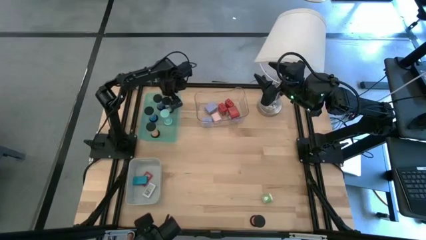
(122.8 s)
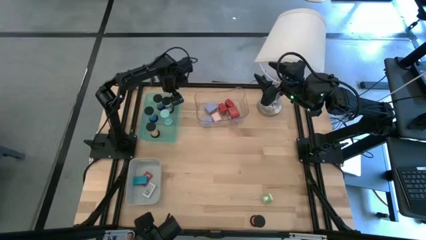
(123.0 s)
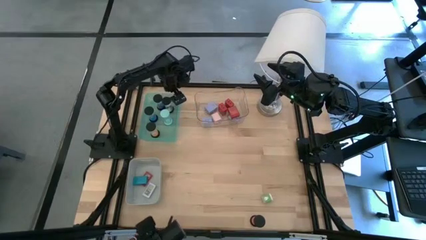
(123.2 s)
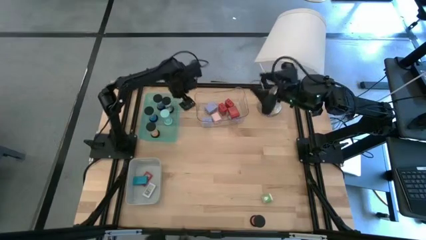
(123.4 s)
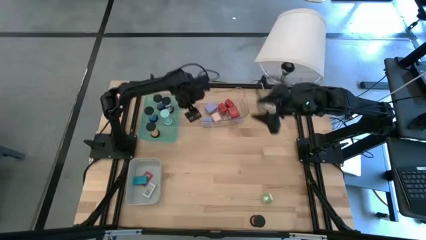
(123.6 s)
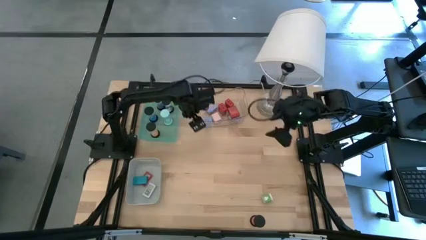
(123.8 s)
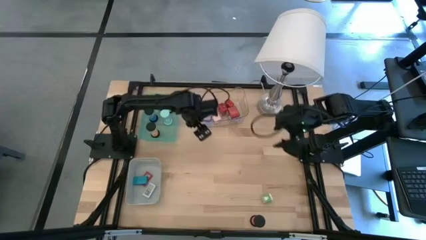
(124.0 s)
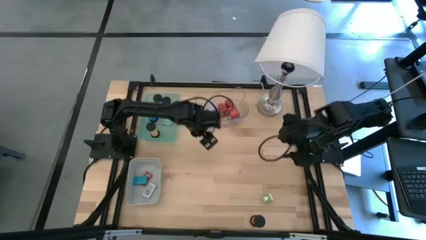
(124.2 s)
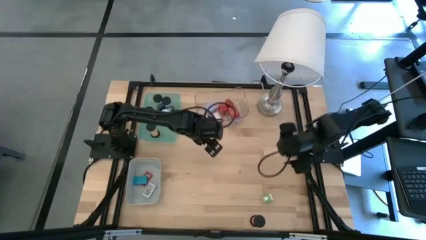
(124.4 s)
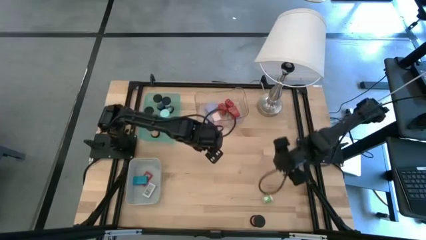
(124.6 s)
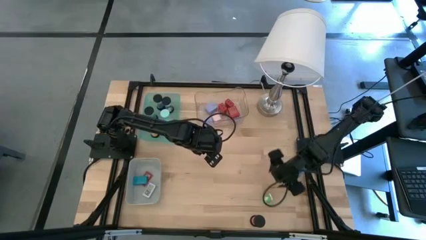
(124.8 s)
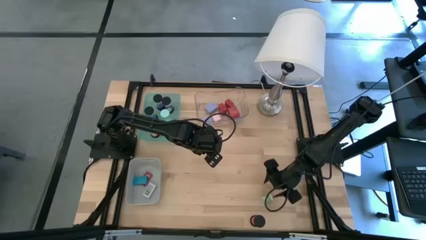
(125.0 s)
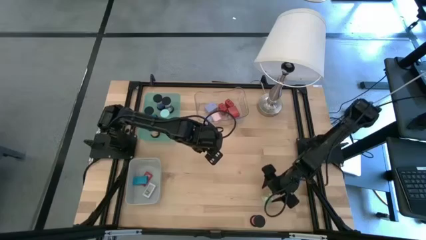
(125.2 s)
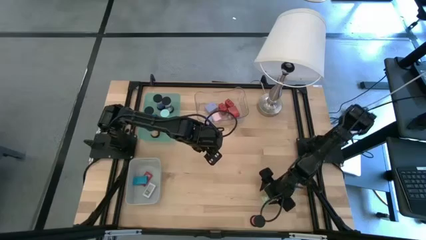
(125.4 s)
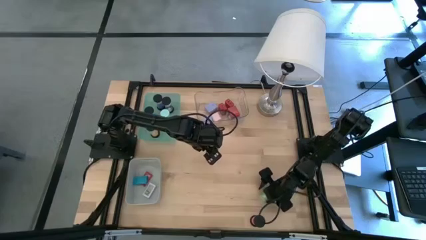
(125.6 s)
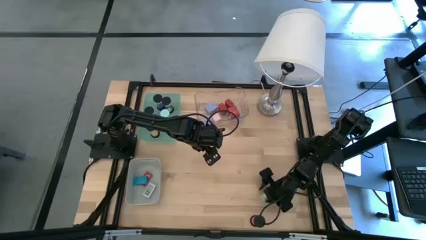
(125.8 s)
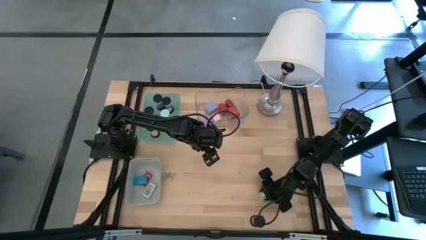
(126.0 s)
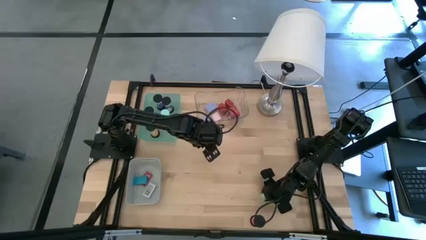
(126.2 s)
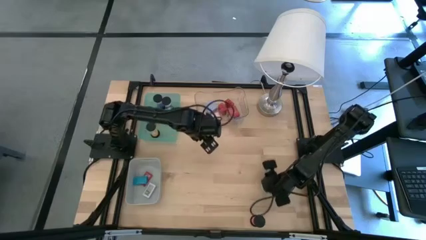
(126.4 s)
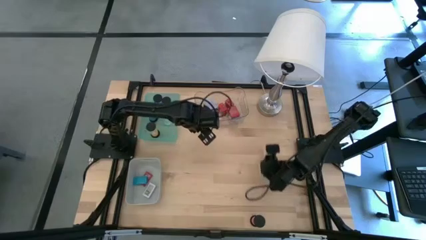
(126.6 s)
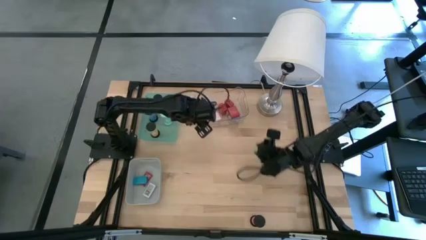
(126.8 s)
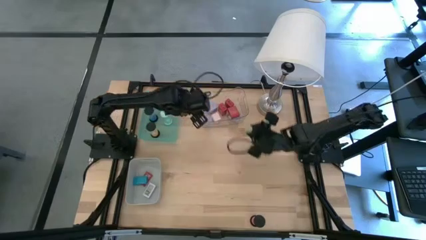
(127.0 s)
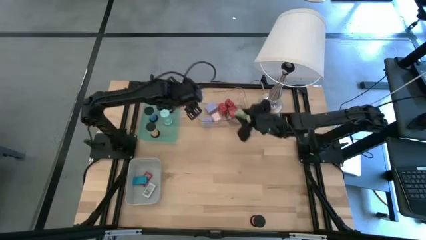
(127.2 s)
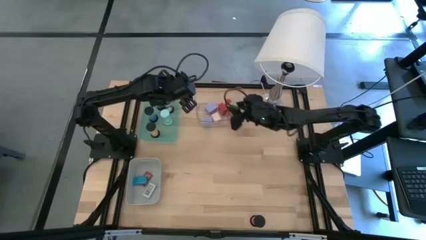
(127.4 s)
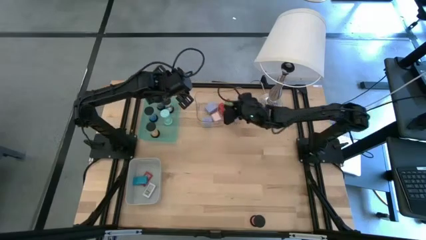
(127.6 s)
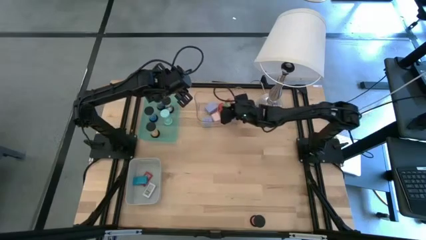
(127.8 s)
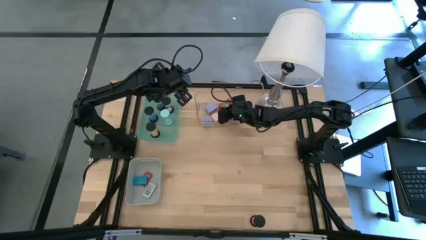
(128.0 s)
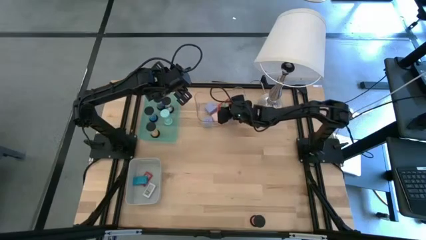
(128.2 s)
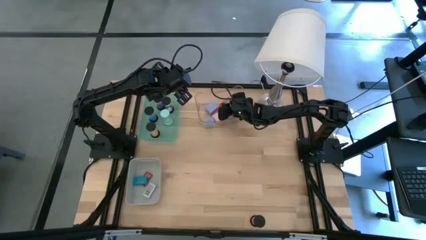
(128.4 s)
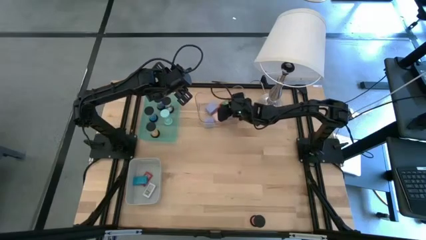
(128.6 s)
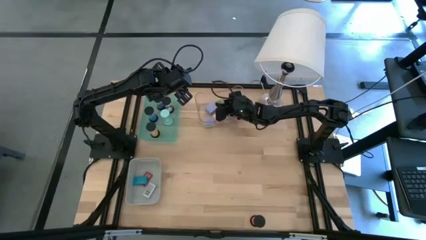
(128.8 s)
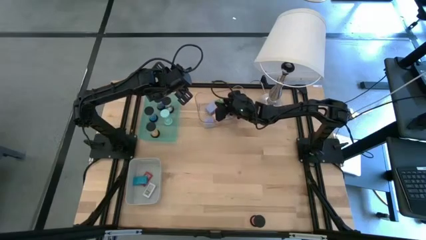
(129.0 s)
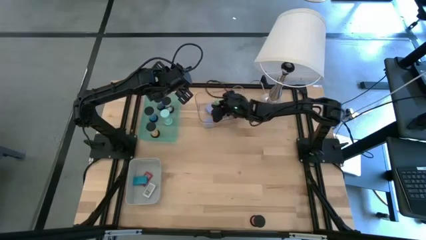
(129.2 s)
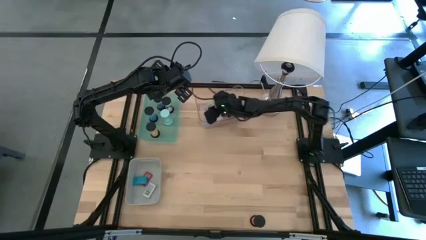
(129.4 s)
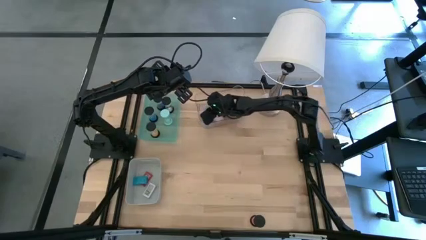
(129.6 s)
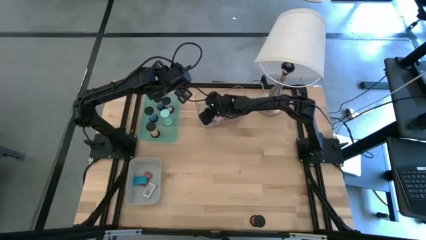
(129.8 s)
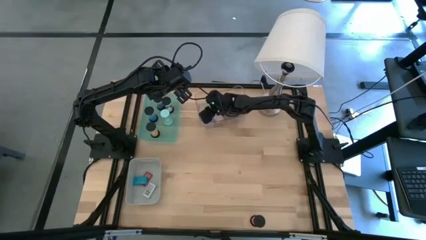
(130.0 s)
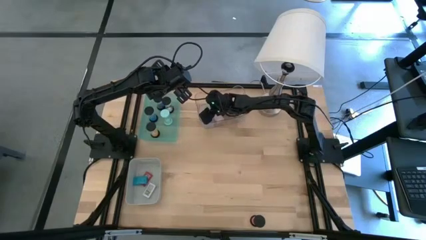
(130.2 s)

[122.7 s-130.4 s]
Task: Pick & Place Office items
Put the green charger adapter into the transparent bin

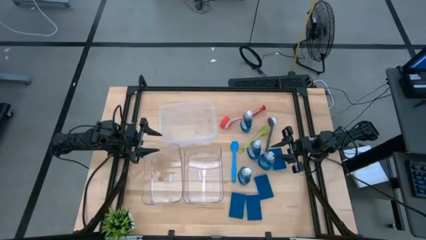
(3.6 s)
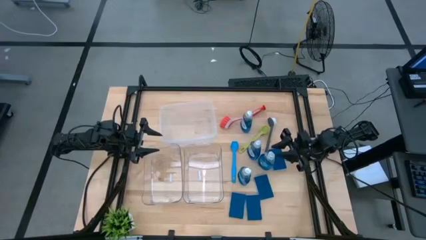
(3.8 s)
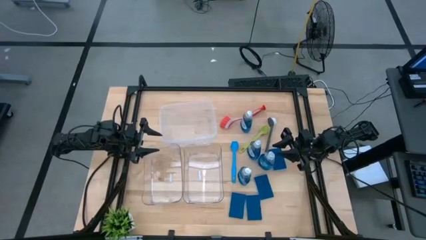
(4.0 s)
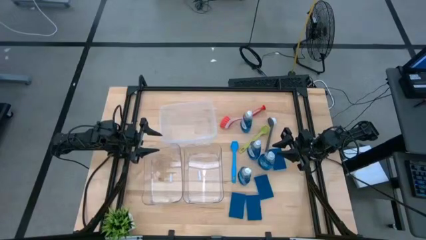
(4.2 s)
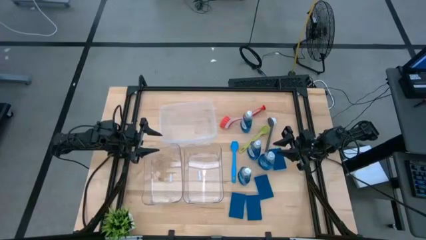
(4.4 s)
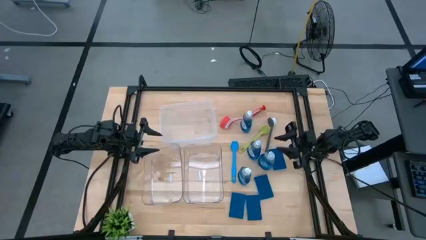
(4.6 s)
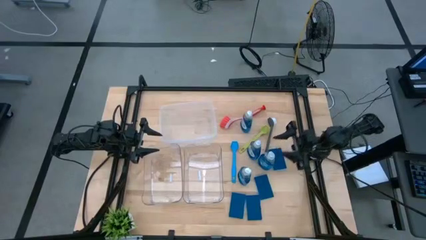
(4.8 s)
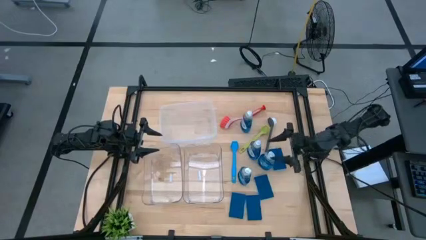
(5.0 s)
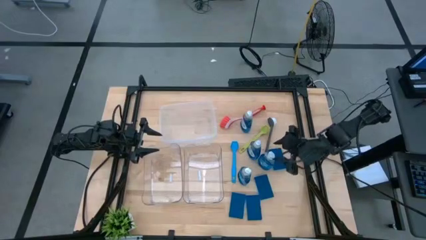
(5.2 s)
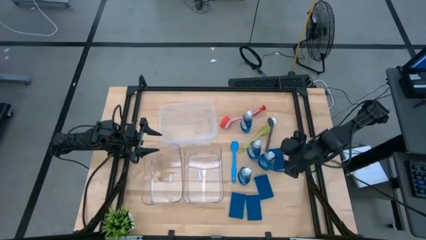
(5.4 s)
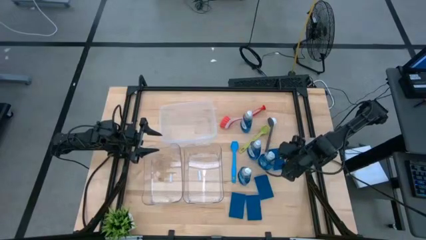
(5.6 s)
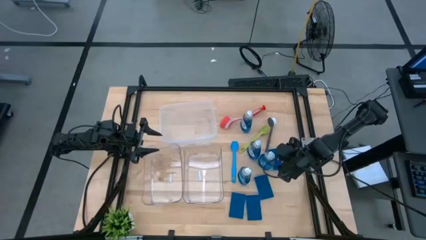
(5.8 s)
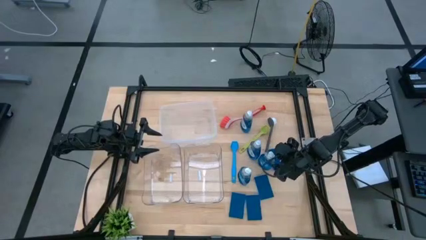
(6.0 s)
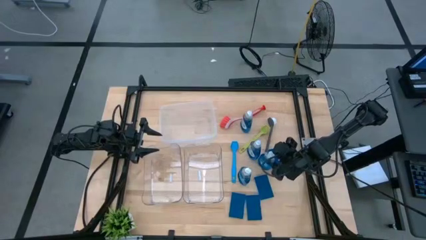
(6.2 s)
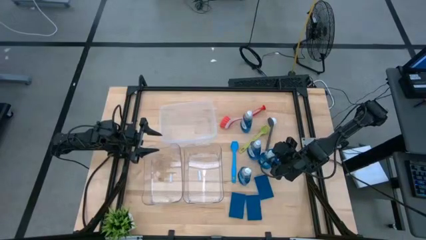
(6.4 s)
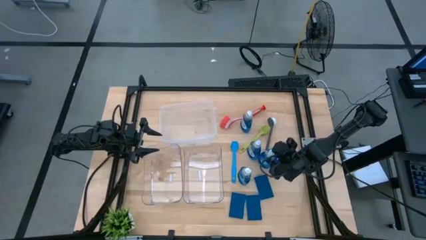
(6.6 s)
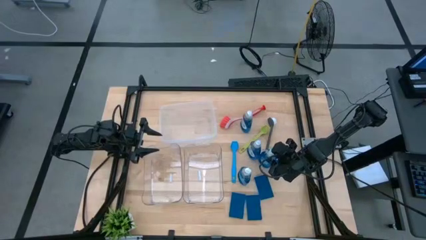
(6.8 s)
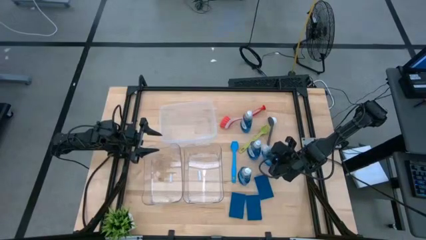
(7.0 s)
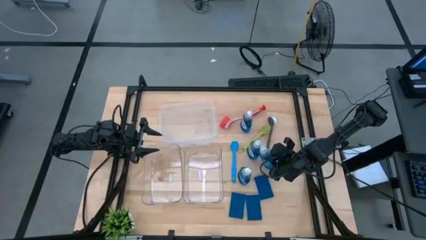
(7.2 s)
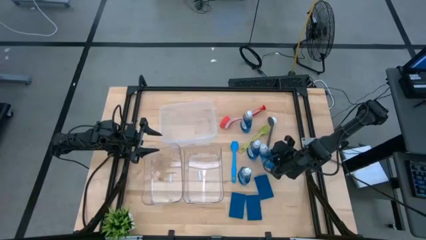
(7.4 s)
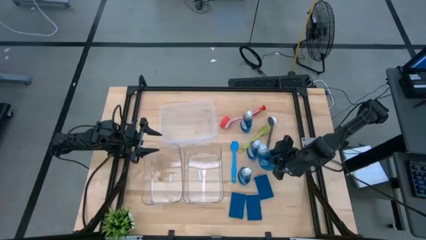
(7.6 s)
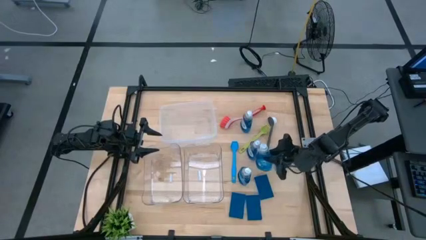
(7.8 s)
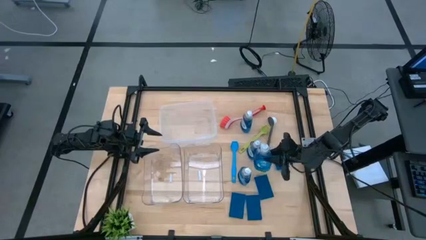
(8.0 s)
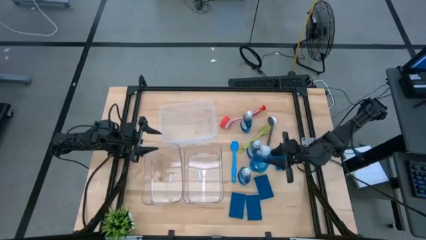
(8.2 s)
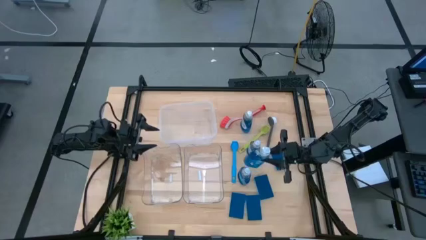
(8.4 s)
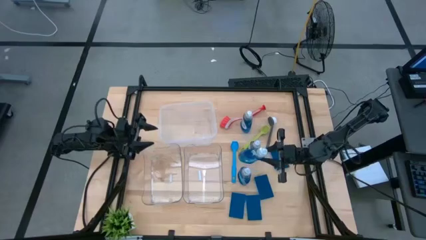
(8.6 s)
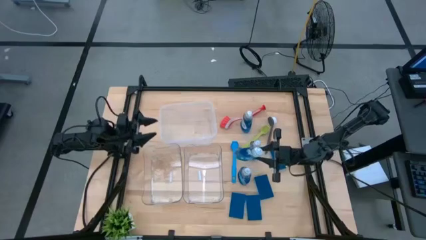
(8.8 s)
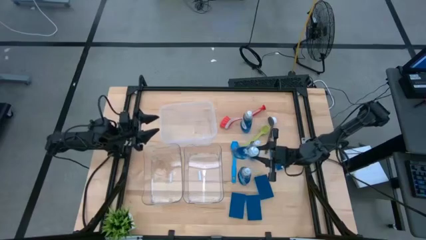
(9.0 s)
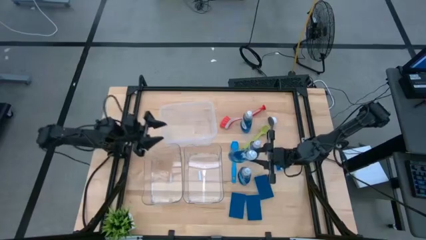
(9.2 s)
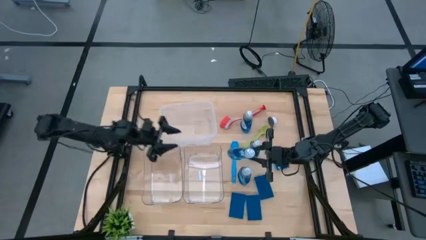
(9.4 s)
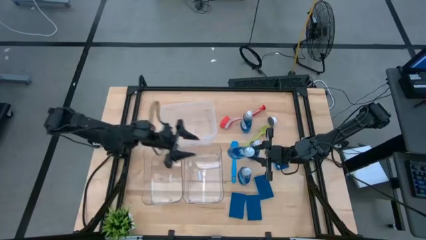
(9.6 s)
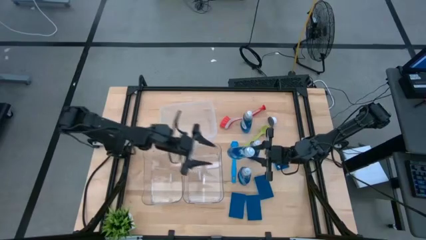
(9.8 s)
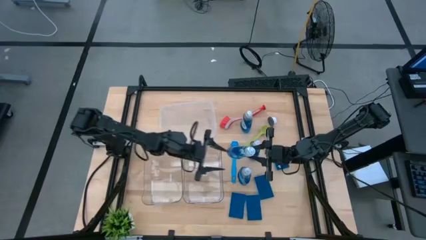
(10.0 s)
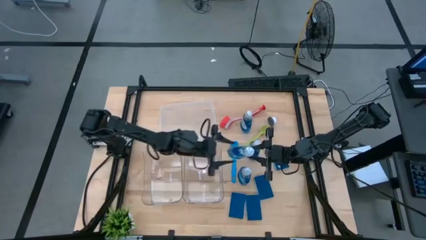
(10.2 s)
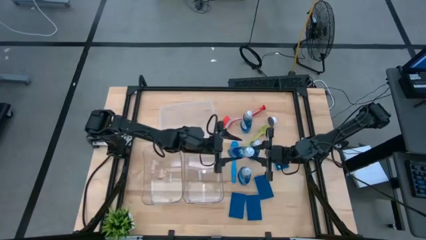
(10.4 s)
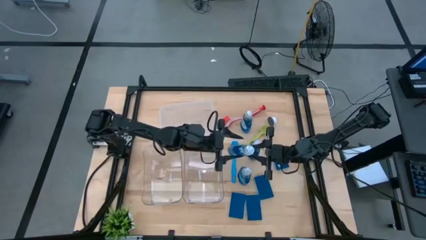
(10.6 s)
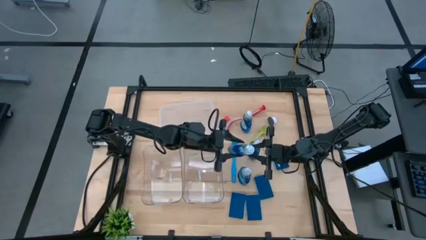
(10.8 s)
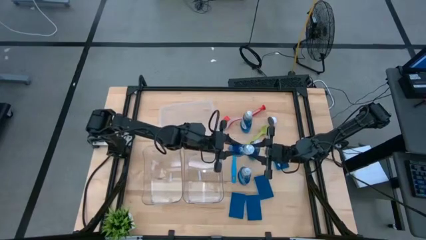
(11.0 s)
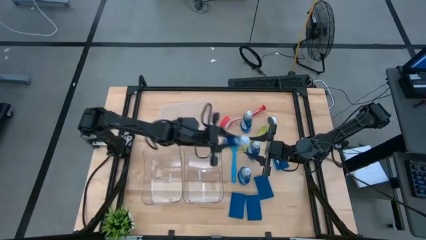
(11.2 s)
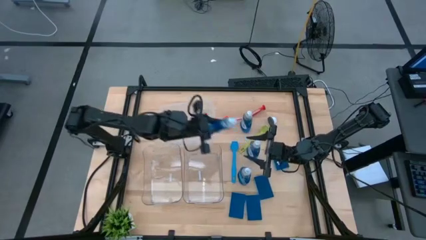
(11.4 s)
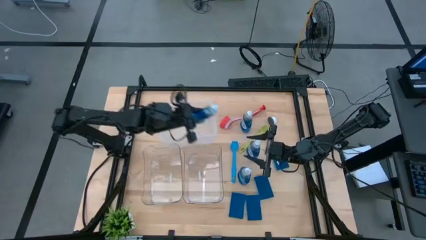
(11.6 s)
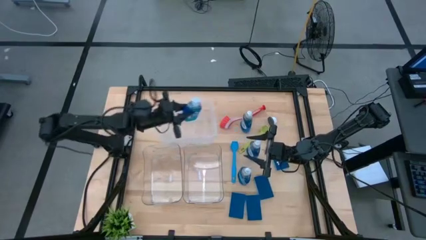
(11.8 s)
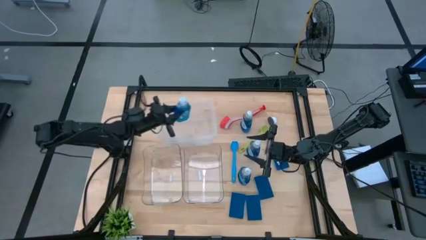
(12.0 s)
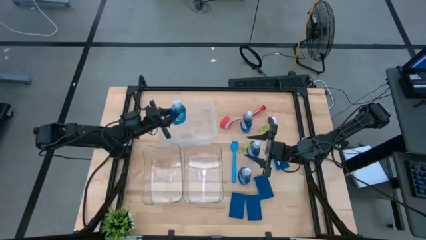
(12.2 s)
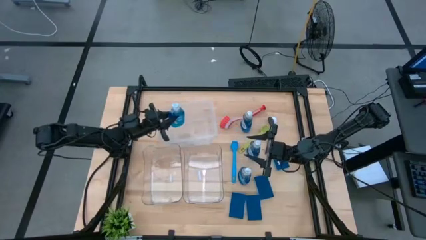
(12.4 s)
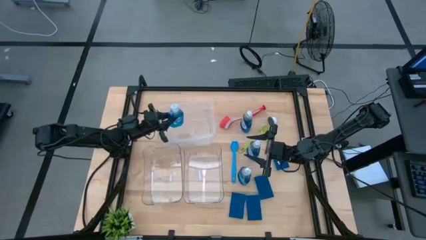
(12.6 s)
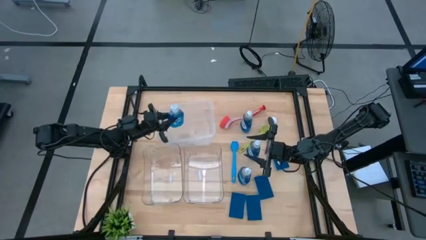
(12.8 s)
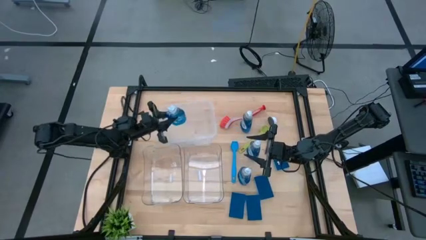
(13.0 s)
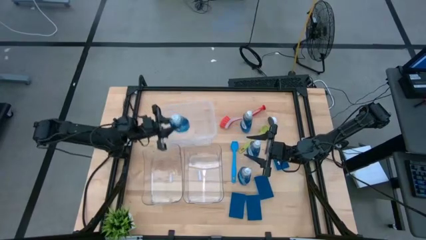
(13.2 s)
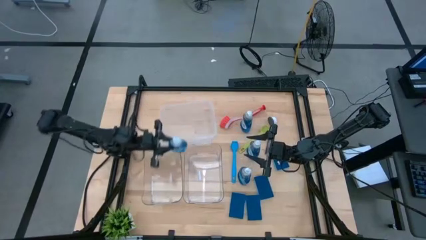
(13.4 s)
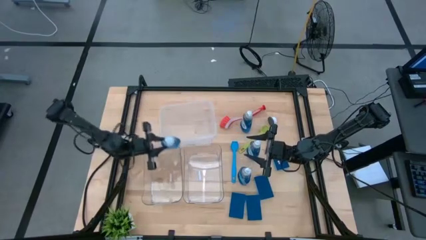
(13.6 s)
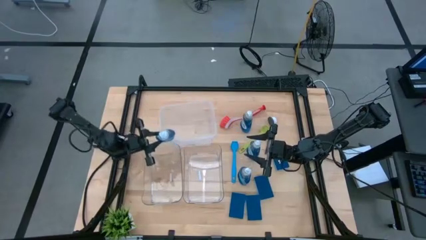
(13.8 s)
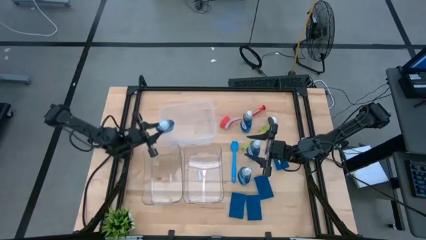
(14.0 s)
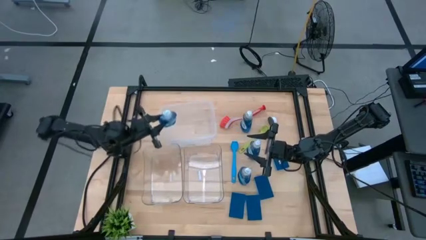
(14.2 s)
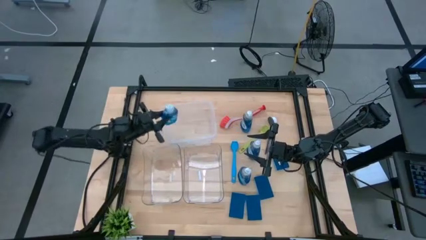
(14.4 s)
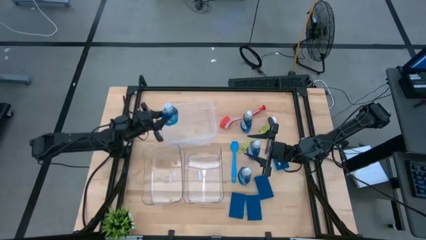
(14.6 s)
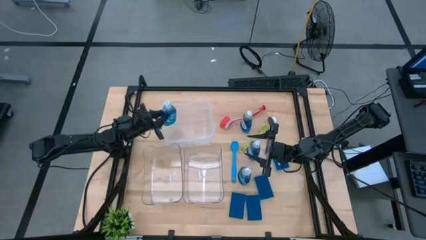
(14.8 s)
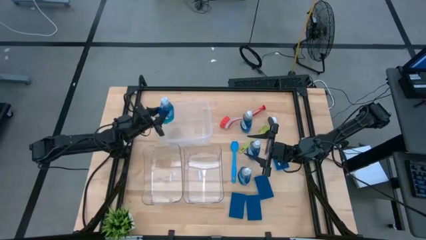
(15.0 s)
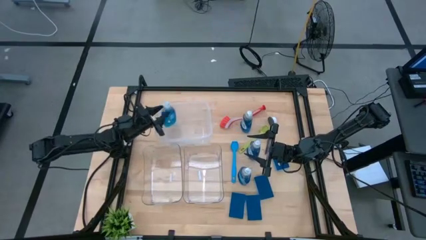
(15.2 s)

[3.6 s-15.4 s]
Task: Pick & Place Kitchen Sink Supplies
Put the blue dishwashing liquid bottle into the white transparent bin
